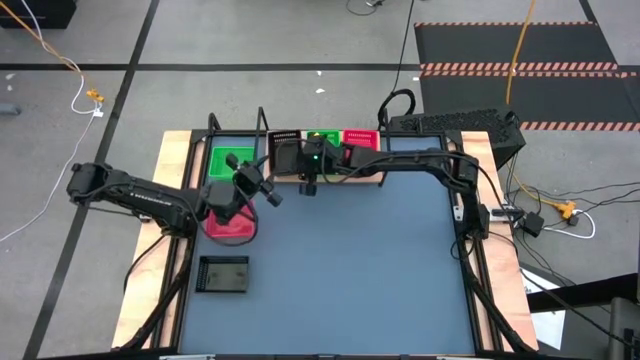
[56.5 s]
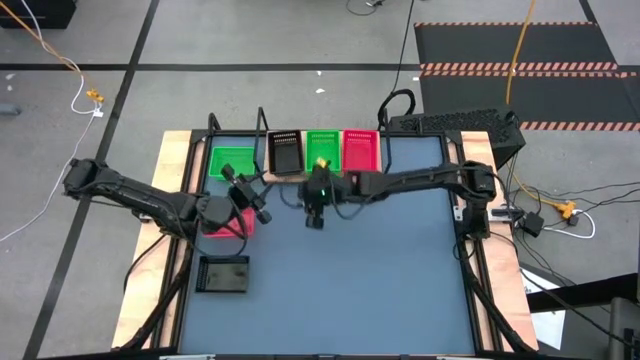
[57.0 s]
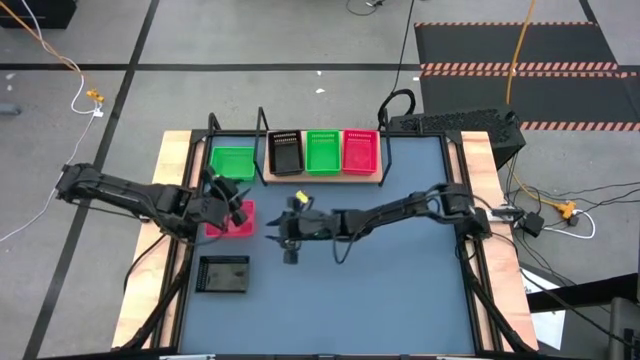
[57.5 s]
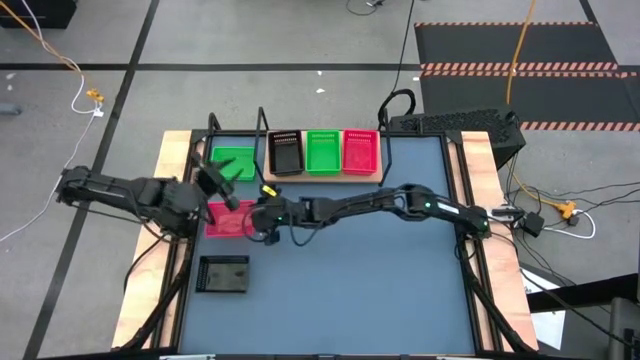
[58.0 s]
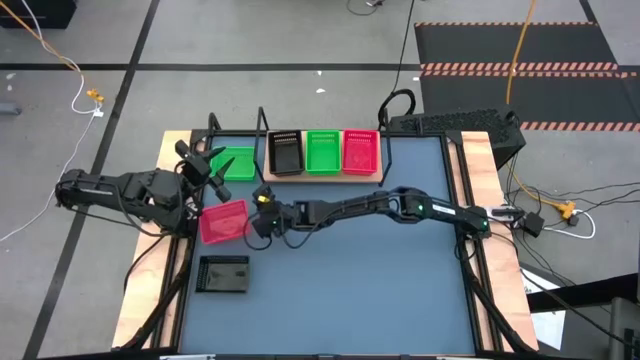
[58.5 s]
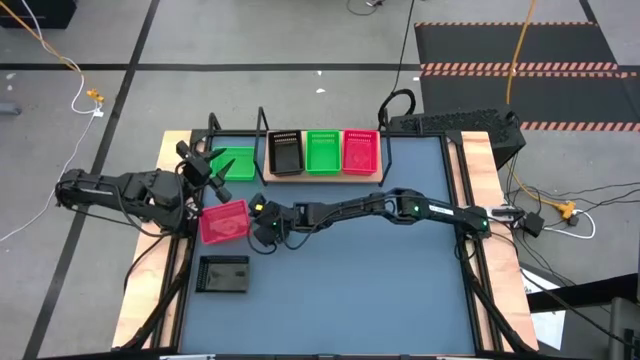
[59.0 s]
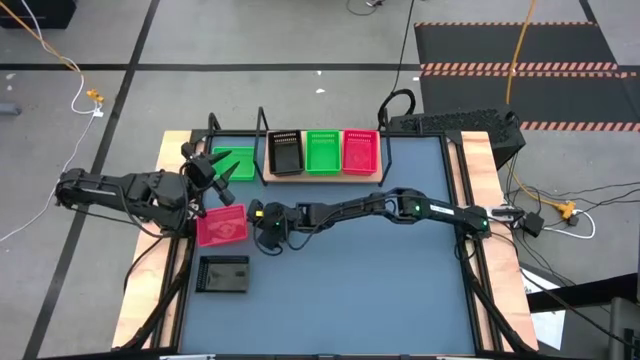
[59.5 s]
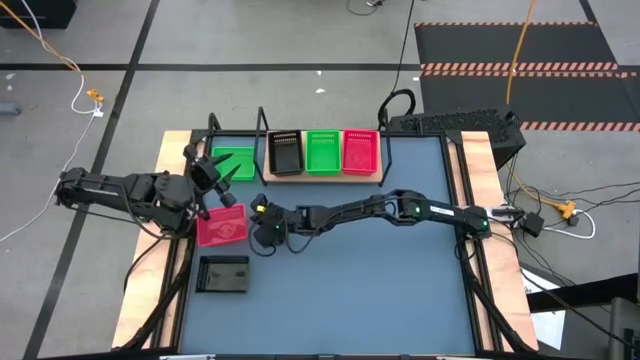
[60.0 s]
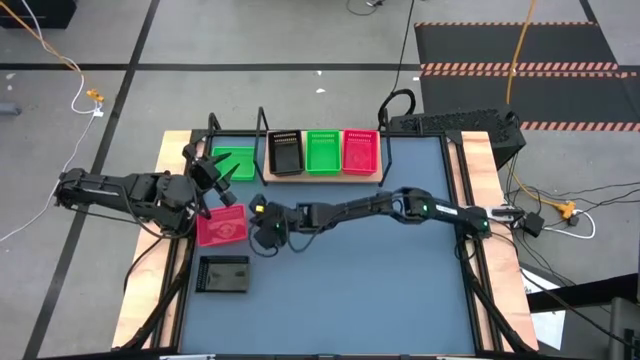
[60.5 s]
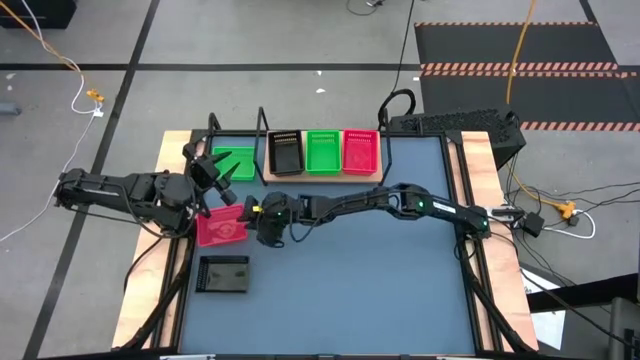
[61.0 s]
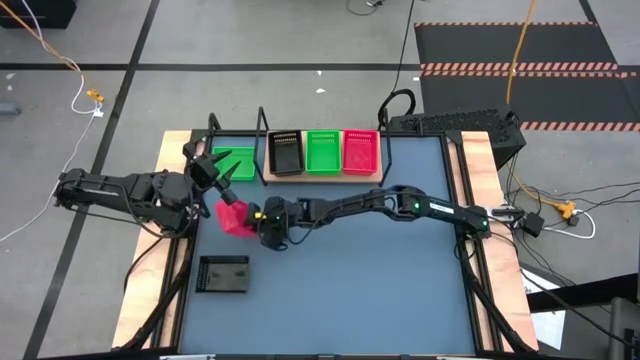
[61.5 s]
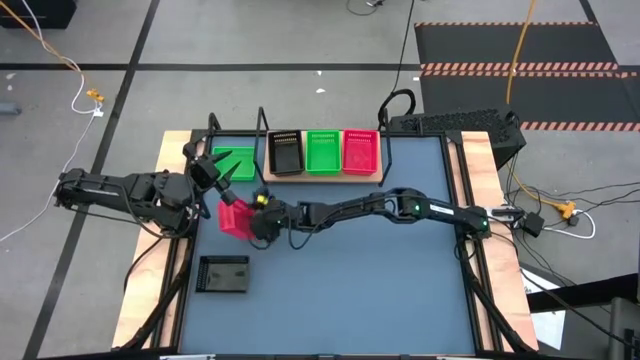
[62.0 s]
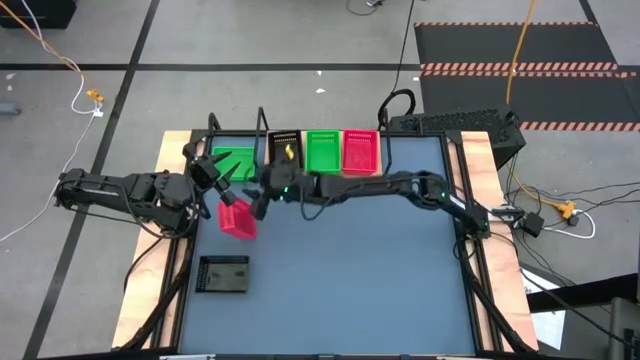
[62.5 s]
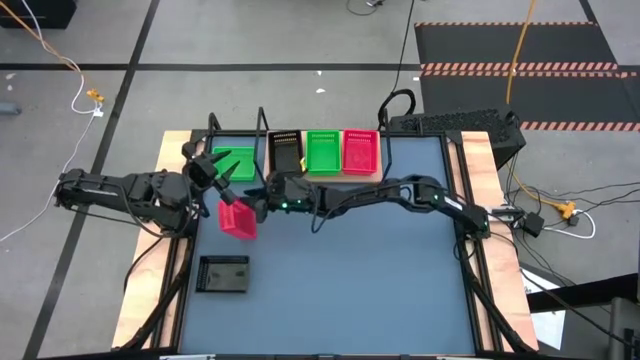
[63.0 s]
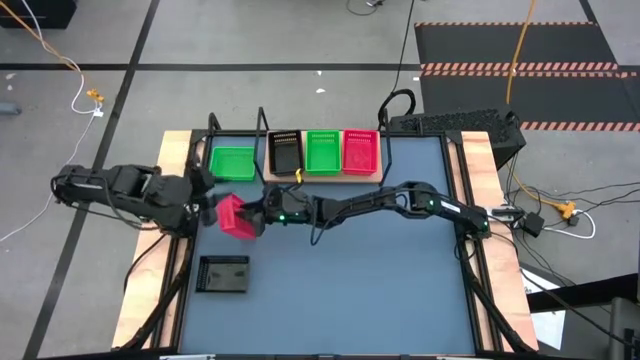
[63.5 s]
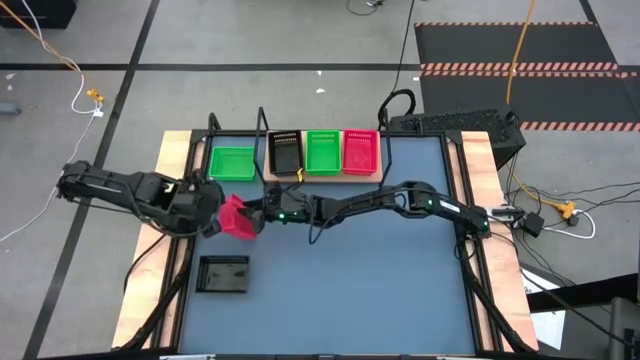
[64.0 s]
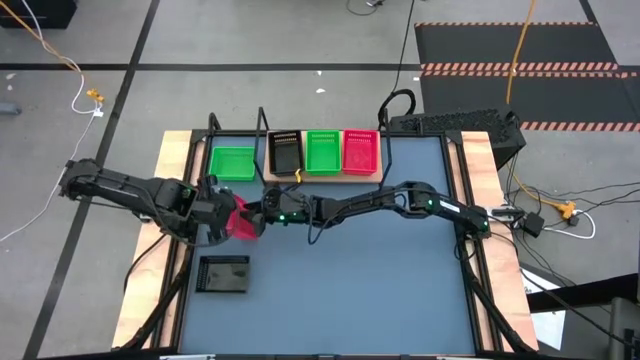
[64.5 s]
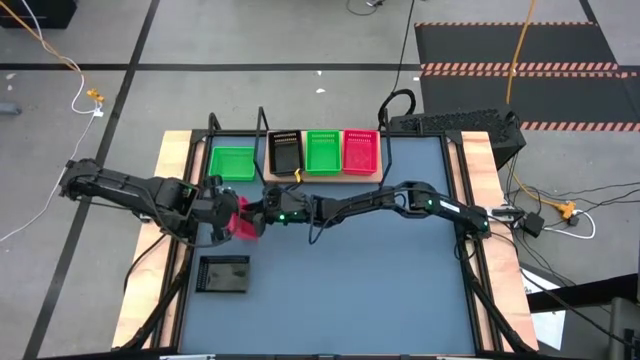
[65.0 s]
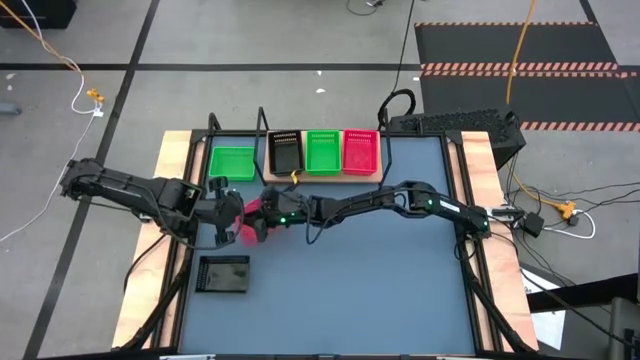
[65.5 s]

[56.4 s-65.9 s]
Task: Stack baskets on shelf by color
Stack the red bin on top of the red bin on the shelf

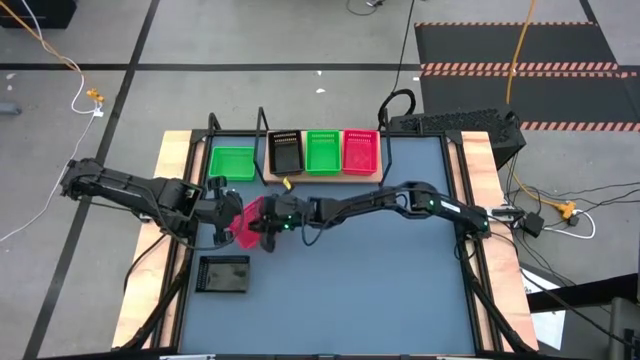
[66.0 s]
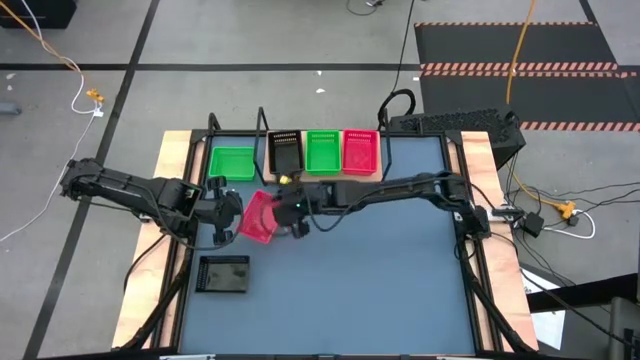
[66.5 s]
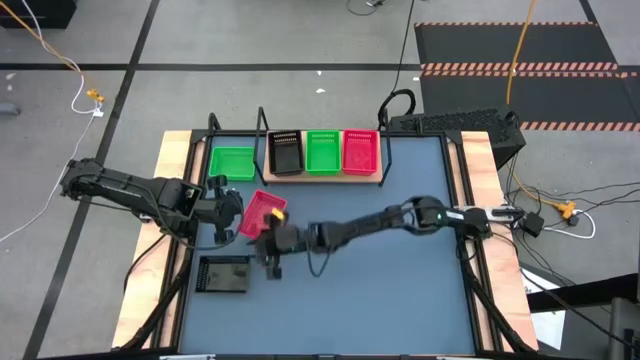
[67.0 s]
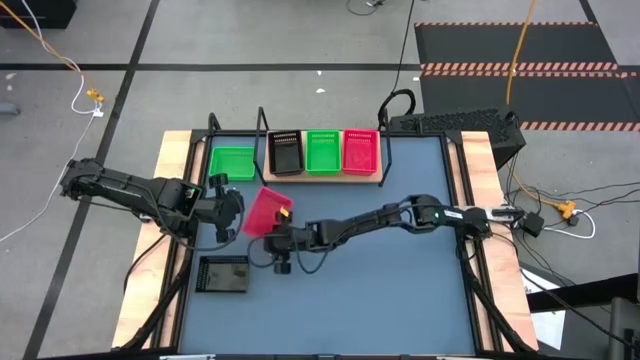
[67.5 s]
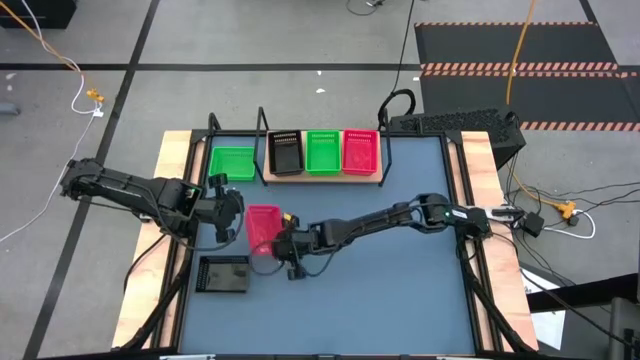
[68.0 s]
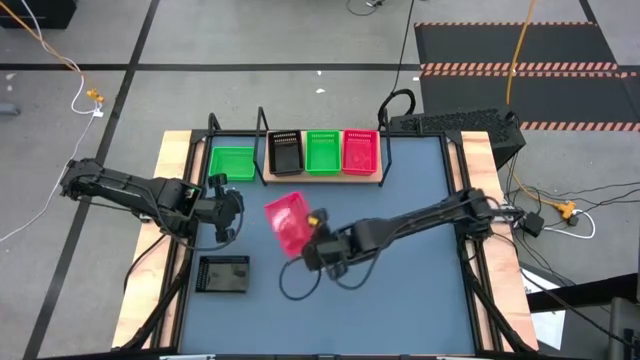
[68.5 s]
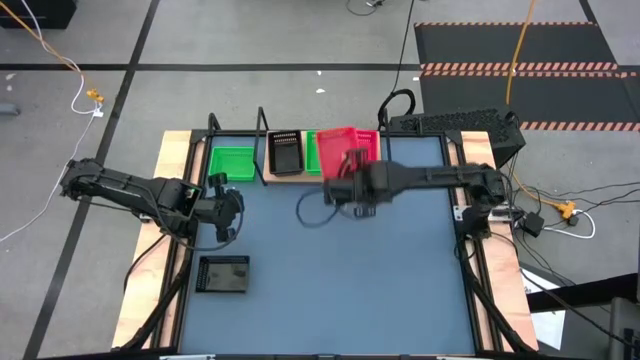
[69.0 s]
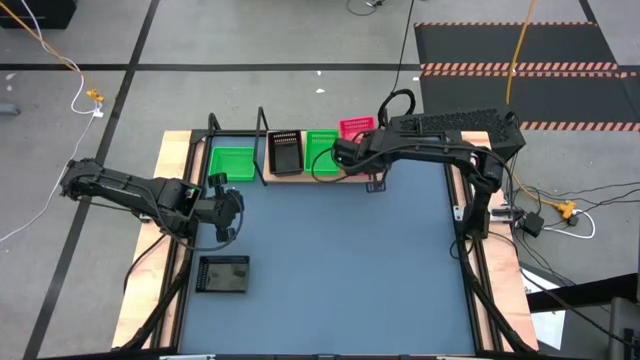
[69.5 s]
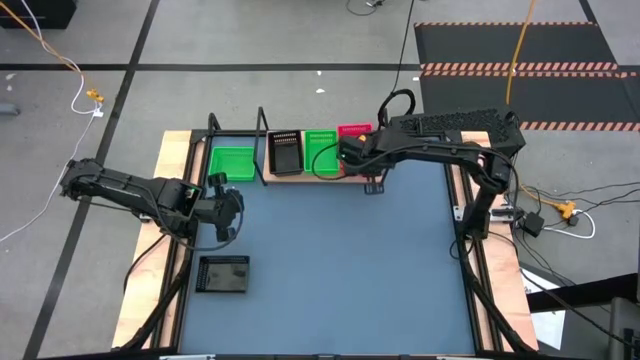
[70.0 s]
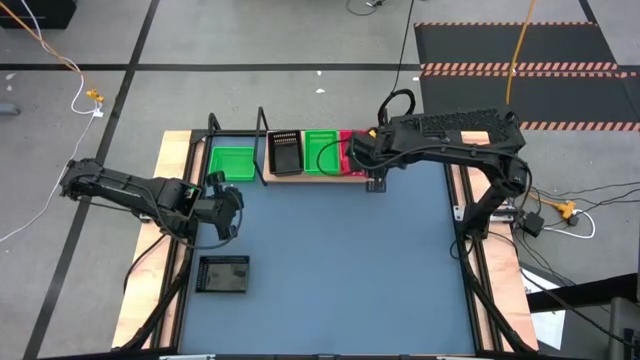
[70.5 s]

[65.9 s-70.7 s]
Stack the red bin on top of the red bin on the shelf

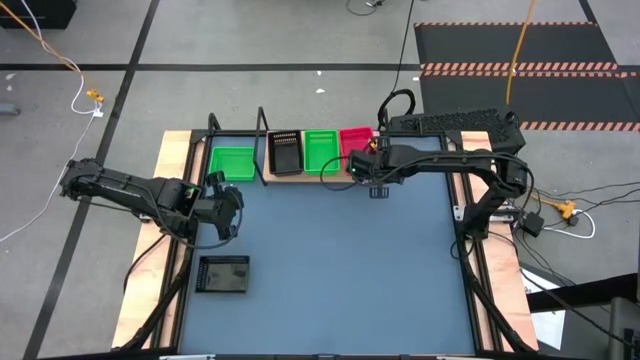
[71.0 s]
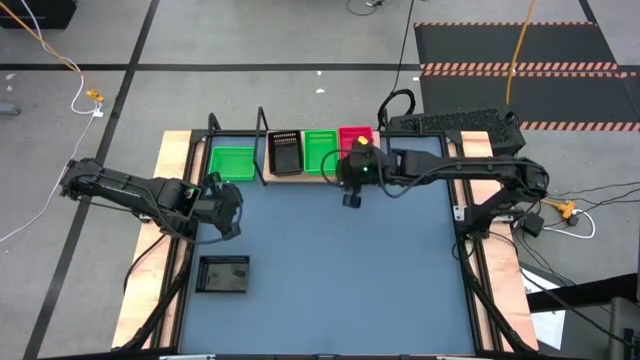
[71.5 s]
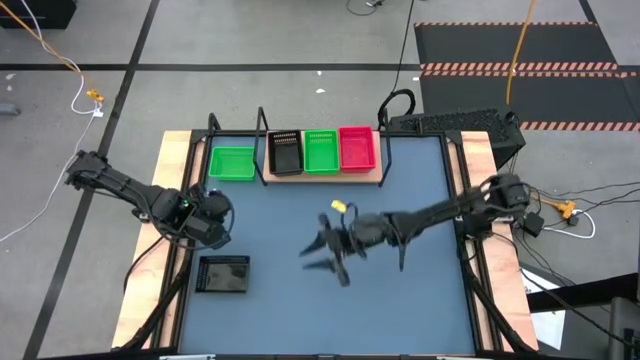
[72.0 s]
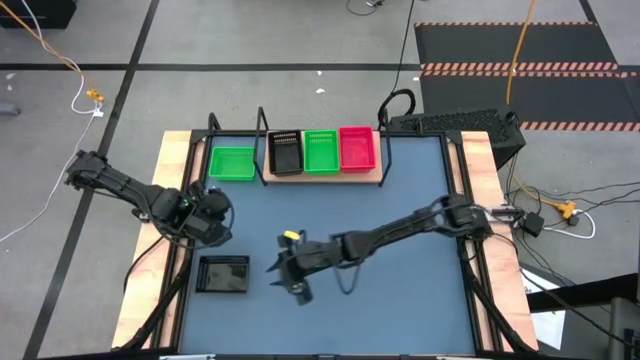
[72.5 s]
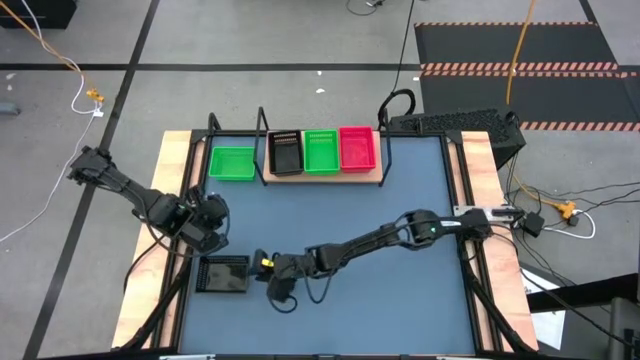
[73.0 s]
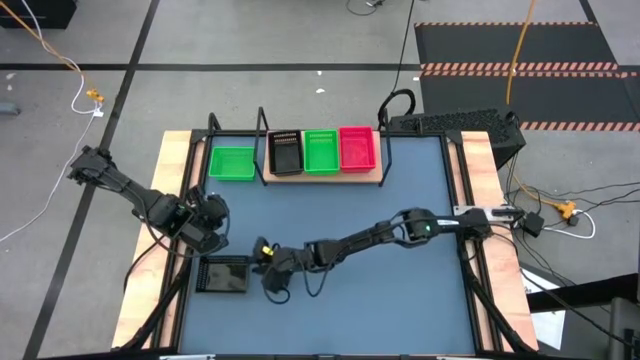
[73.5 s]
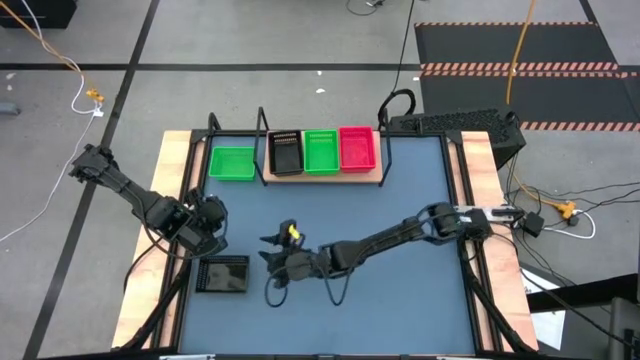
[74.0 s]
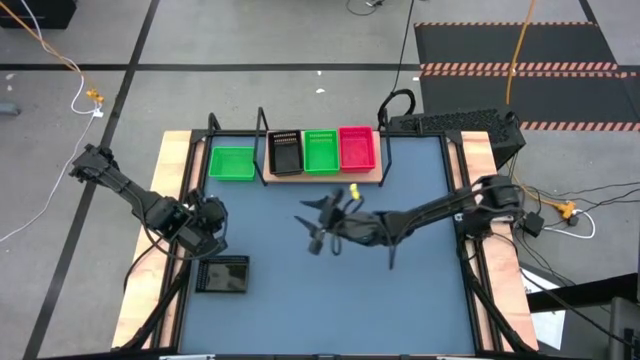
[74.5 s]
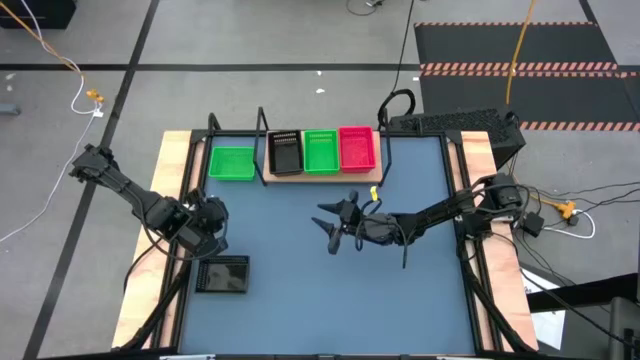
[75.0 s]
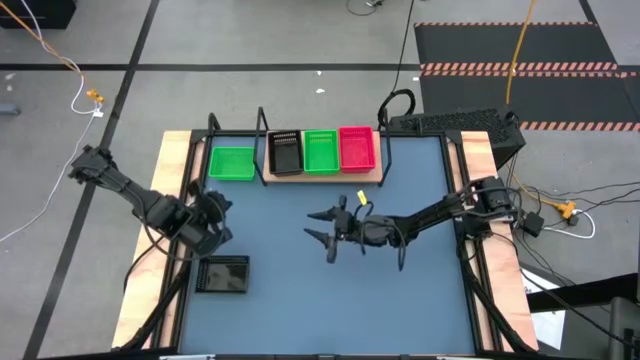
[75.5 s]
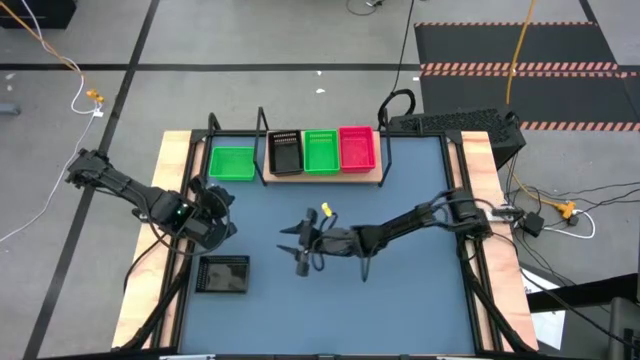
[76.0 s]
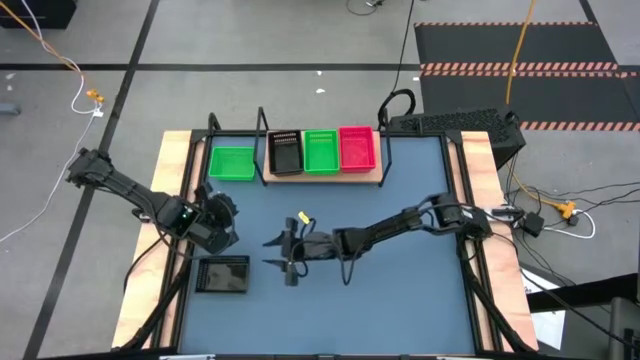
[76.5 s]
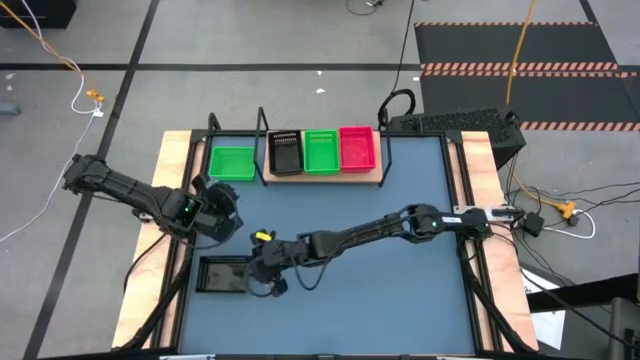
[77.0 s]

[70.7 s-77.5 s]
Stack the black bin on top of the black bin on the shelf

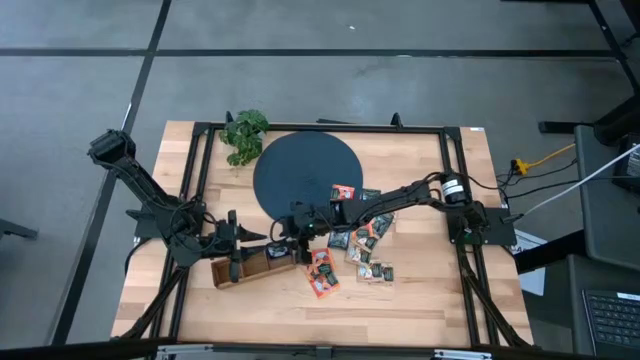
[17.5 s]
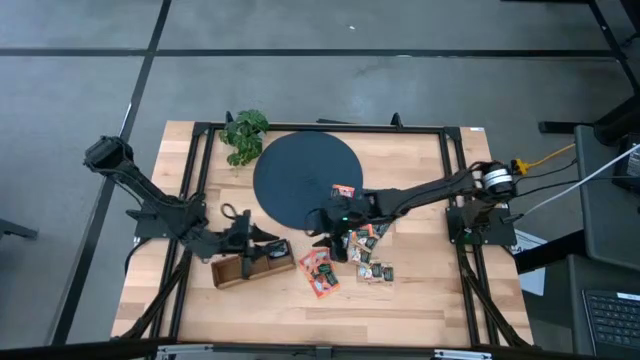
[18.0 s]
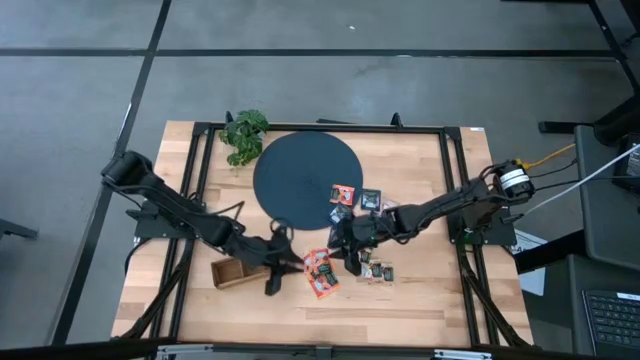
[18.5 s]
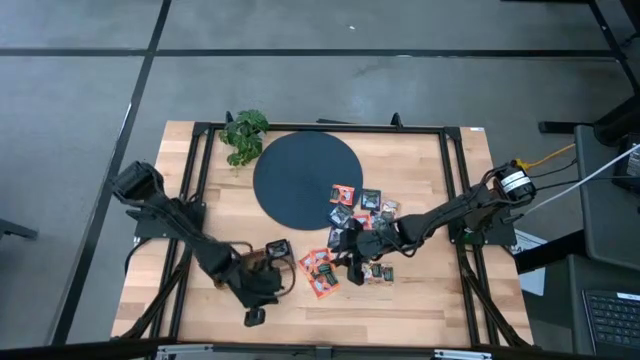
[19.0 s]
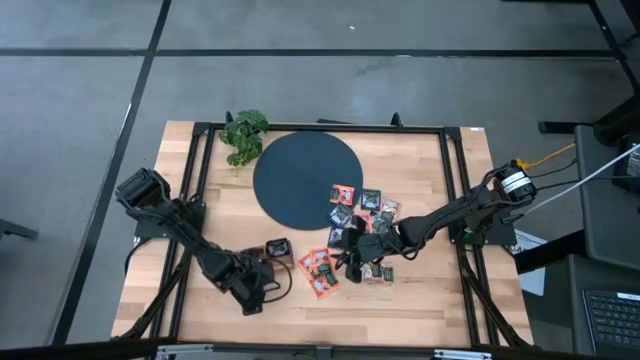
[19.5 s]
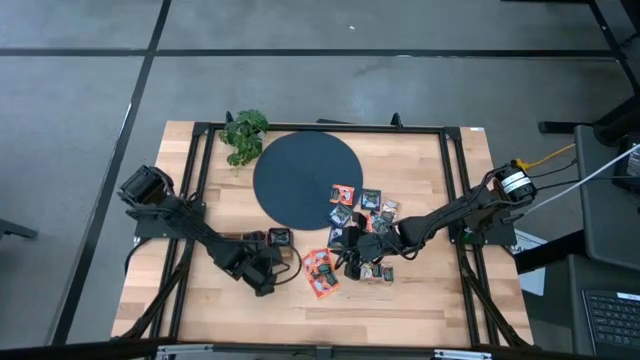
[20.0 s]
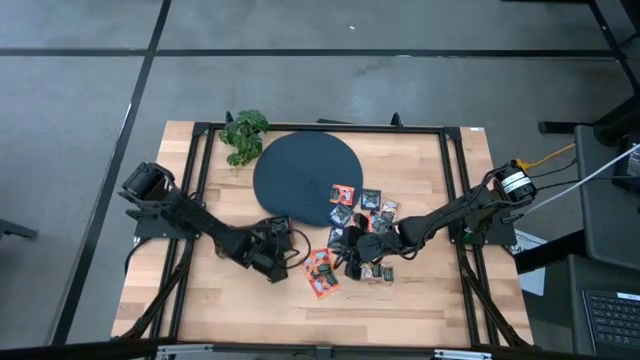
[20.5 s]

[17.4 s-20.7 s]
Task: Pick & Place Tea
Adjust the wooden organizer
